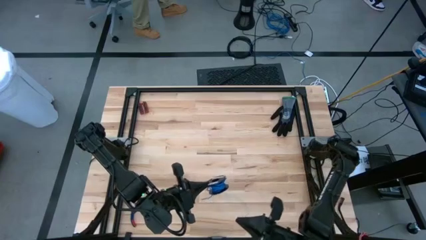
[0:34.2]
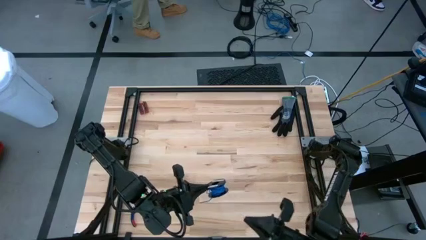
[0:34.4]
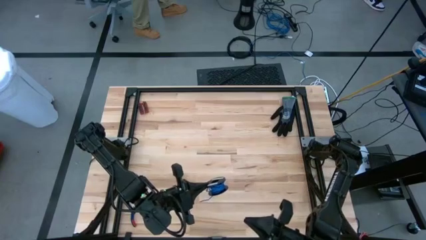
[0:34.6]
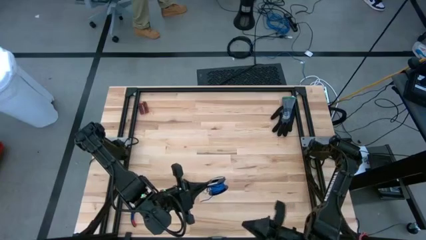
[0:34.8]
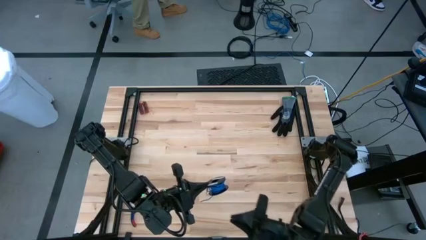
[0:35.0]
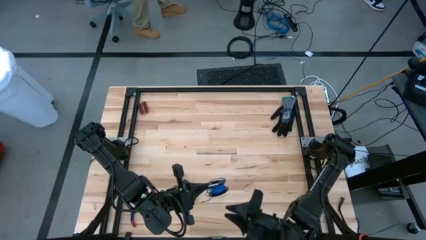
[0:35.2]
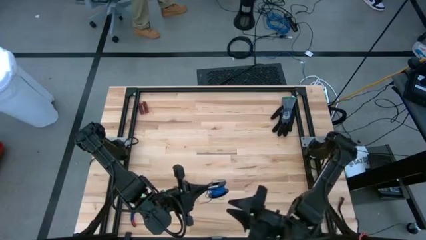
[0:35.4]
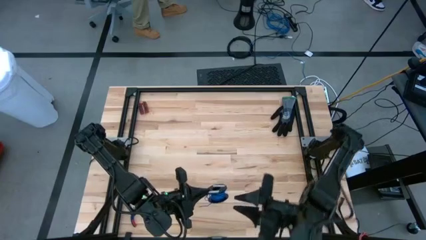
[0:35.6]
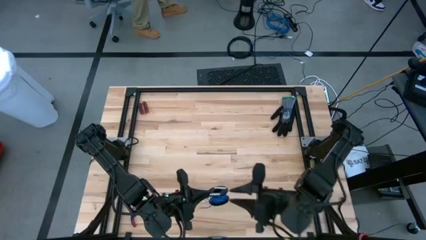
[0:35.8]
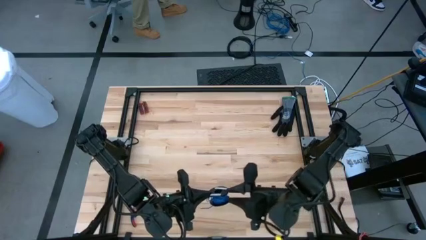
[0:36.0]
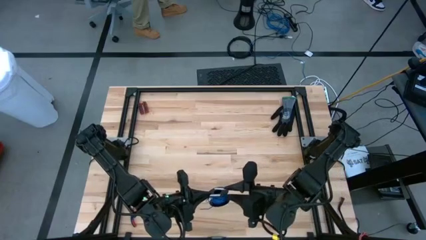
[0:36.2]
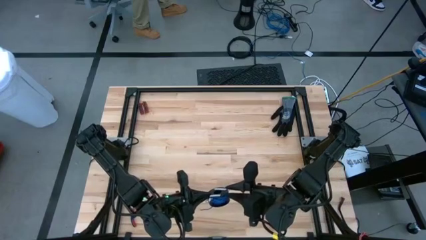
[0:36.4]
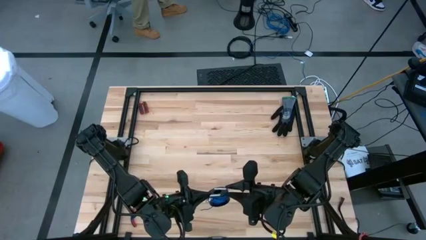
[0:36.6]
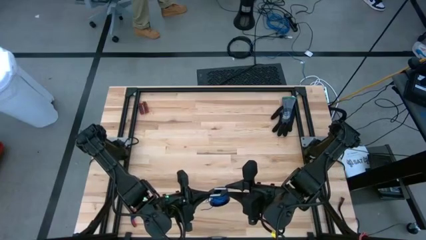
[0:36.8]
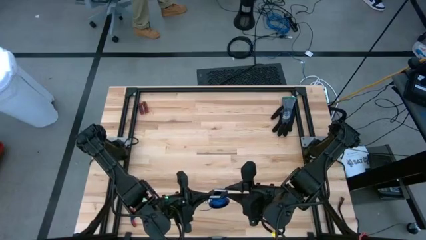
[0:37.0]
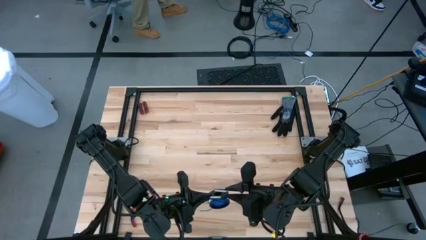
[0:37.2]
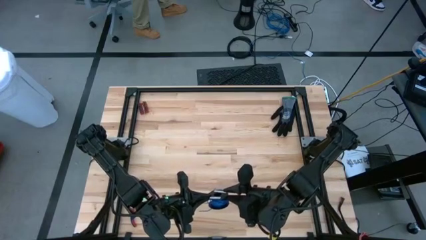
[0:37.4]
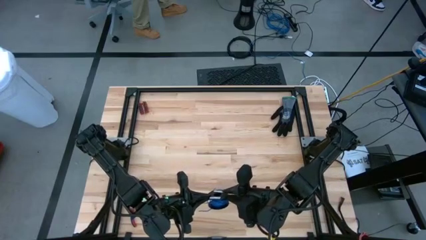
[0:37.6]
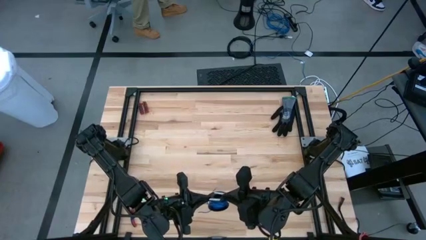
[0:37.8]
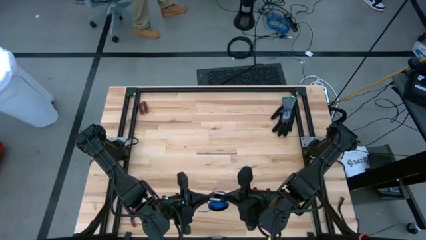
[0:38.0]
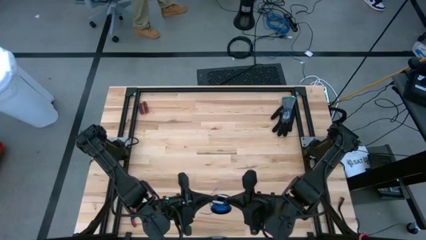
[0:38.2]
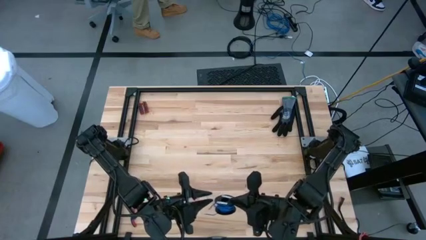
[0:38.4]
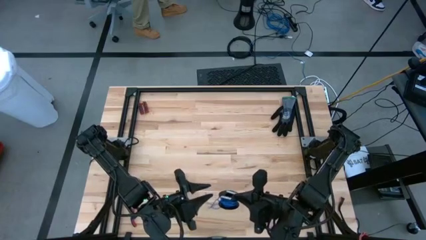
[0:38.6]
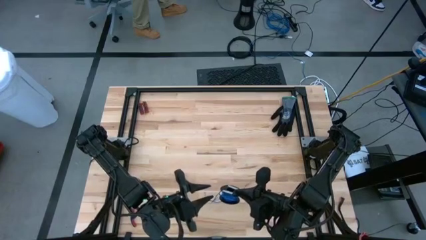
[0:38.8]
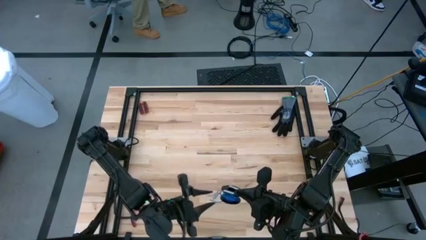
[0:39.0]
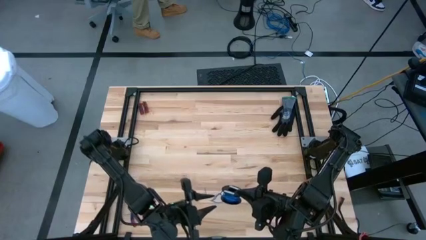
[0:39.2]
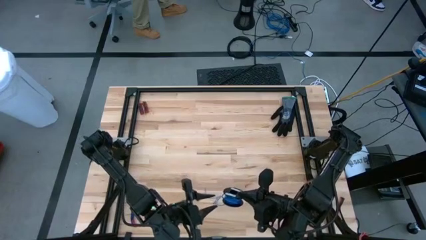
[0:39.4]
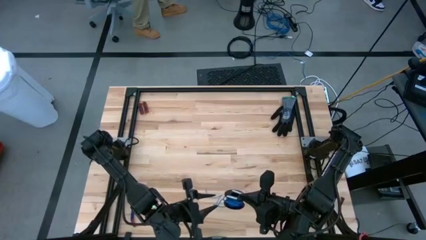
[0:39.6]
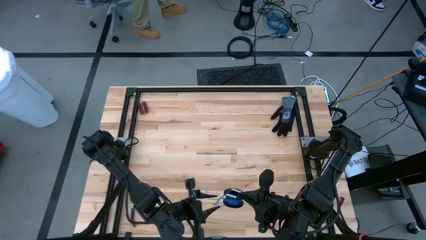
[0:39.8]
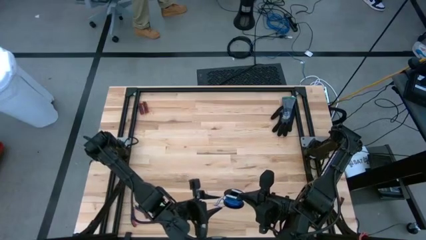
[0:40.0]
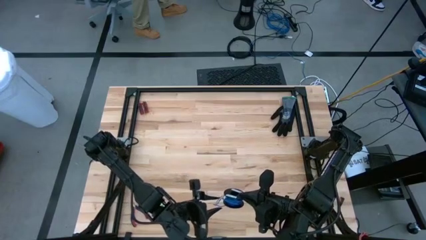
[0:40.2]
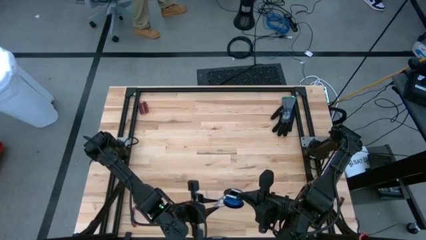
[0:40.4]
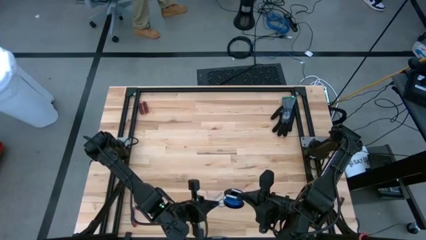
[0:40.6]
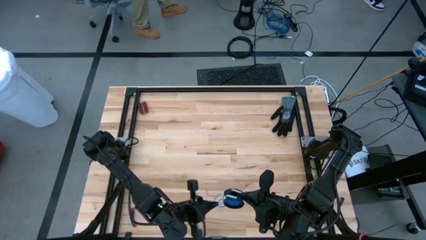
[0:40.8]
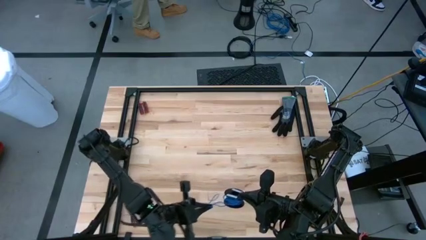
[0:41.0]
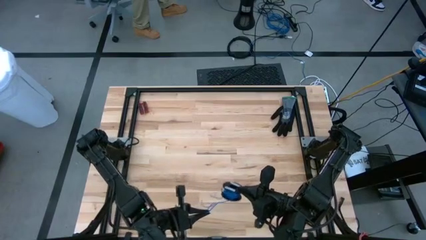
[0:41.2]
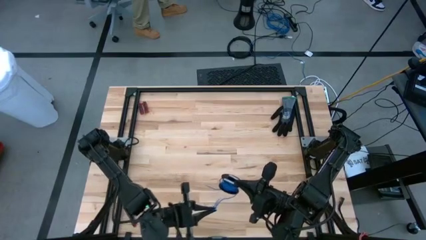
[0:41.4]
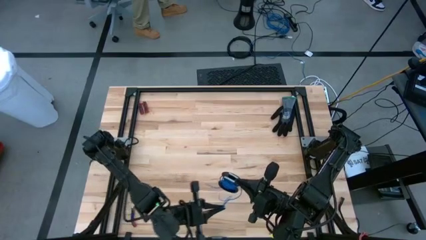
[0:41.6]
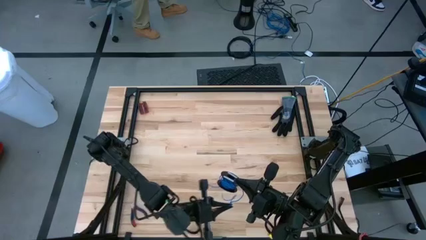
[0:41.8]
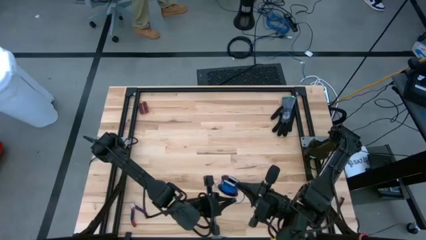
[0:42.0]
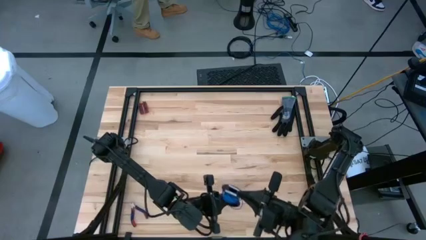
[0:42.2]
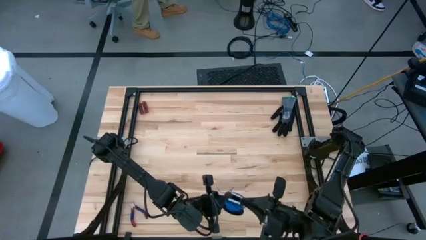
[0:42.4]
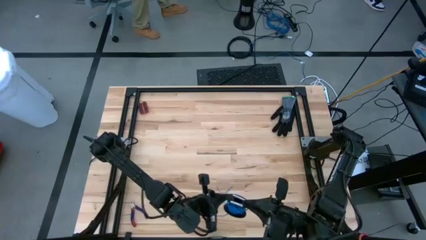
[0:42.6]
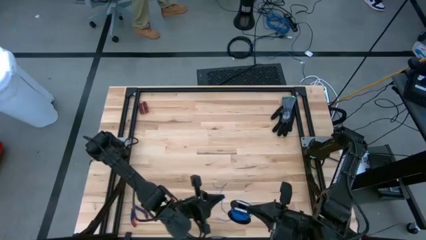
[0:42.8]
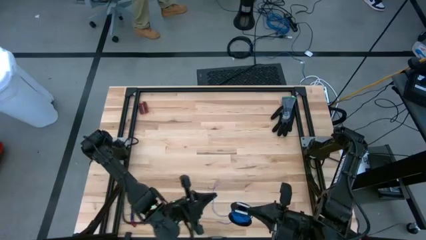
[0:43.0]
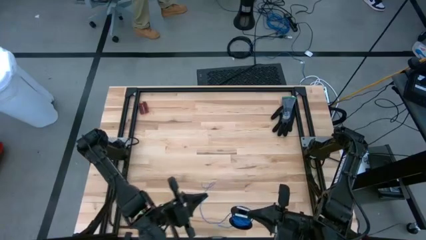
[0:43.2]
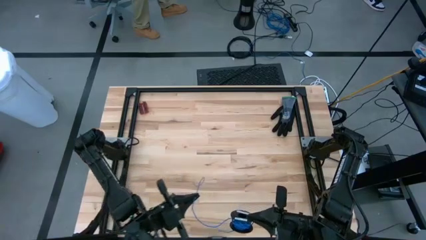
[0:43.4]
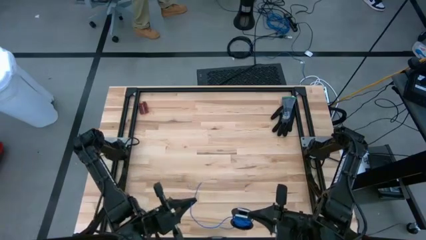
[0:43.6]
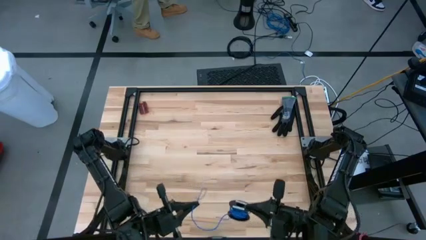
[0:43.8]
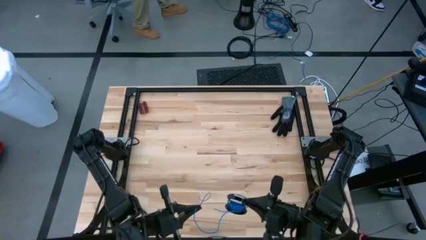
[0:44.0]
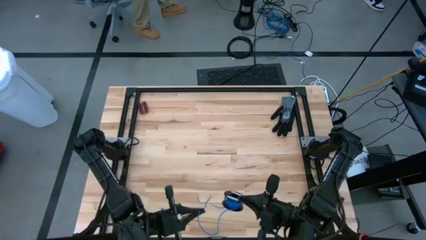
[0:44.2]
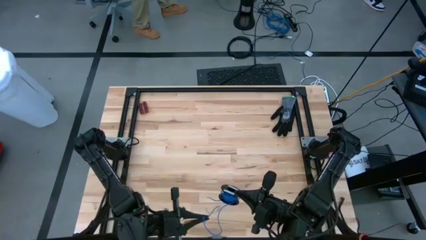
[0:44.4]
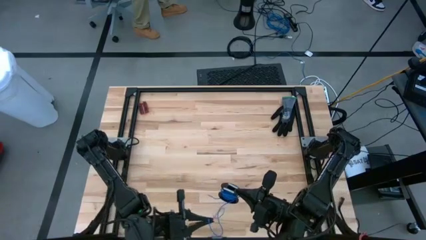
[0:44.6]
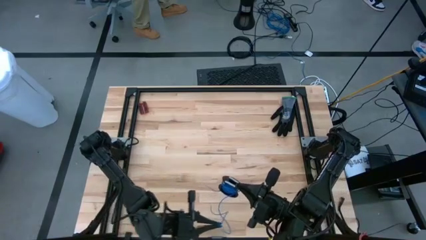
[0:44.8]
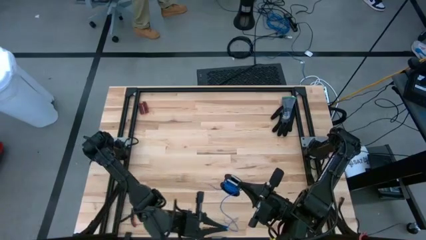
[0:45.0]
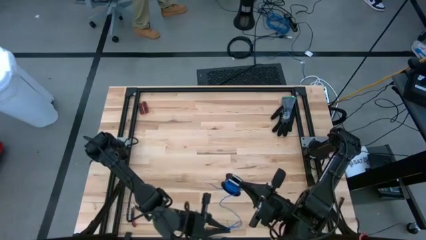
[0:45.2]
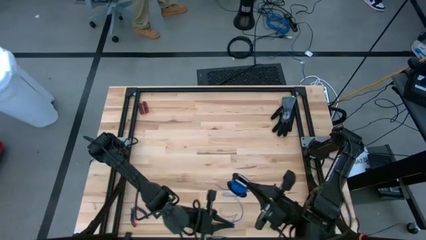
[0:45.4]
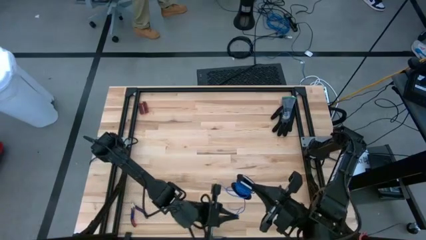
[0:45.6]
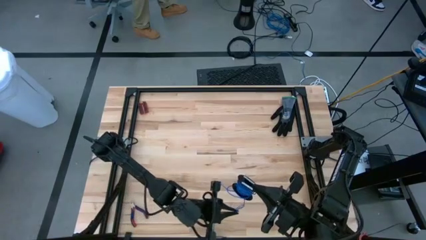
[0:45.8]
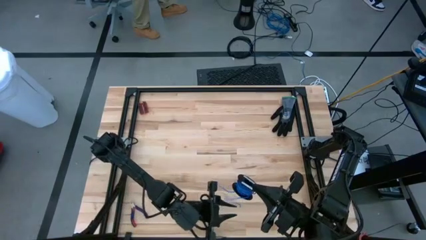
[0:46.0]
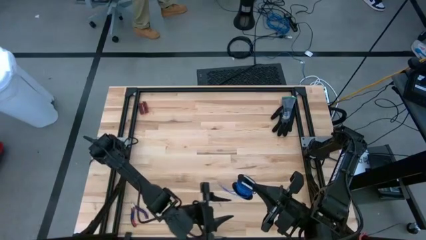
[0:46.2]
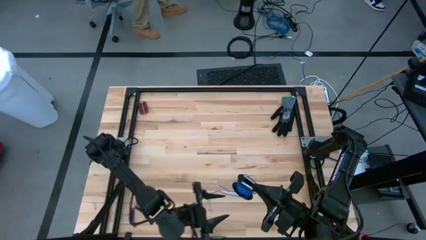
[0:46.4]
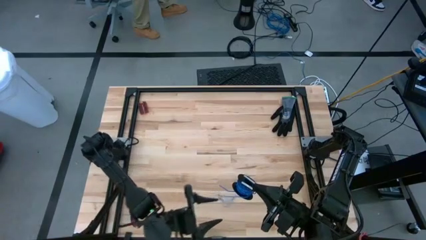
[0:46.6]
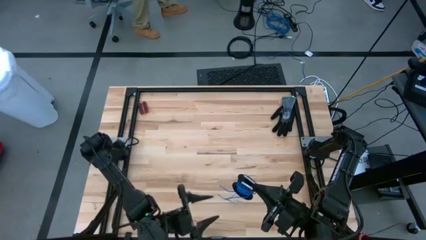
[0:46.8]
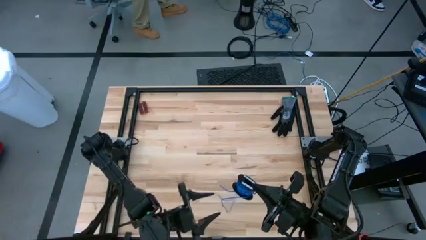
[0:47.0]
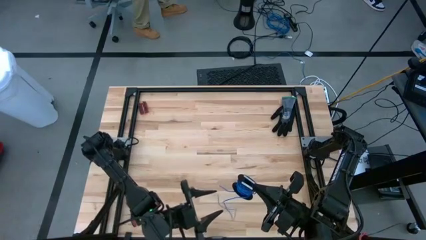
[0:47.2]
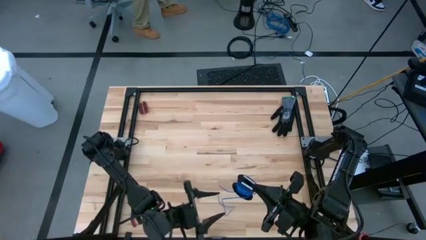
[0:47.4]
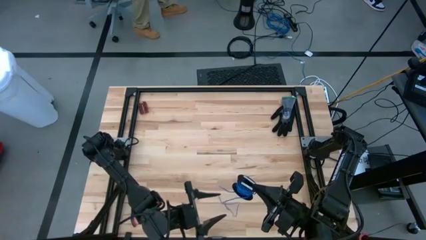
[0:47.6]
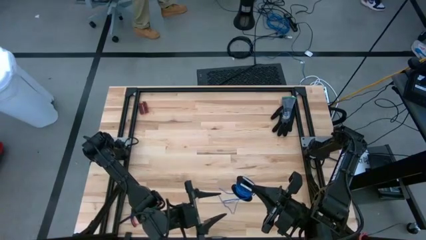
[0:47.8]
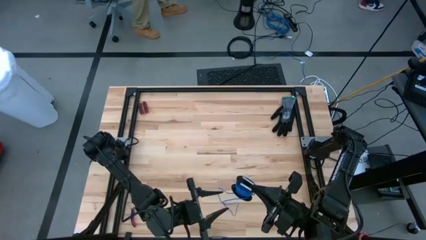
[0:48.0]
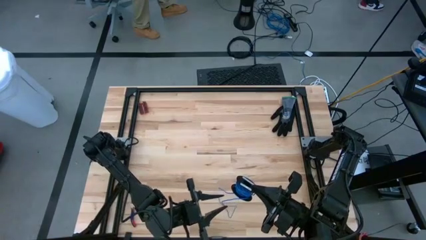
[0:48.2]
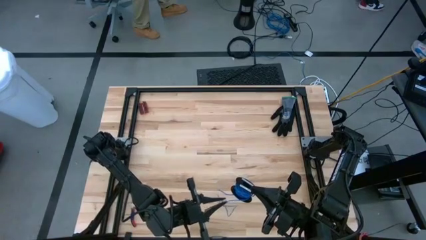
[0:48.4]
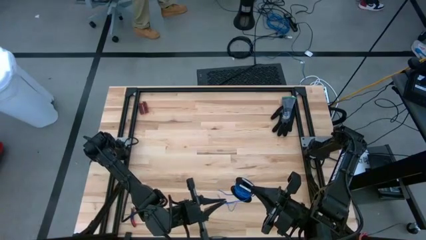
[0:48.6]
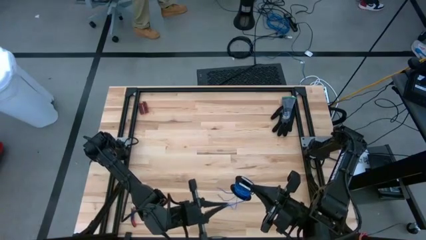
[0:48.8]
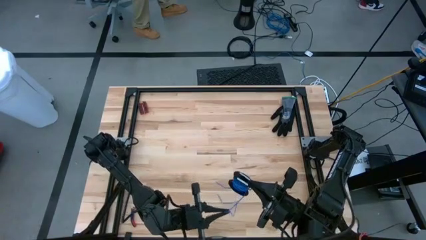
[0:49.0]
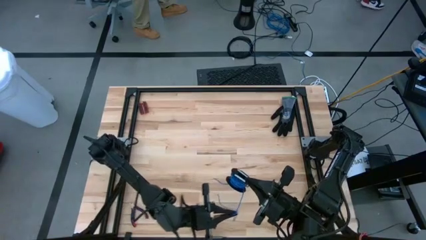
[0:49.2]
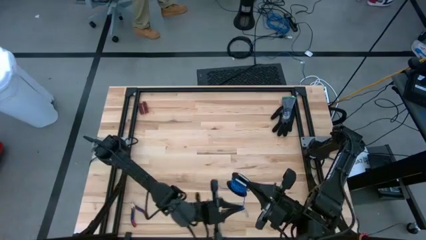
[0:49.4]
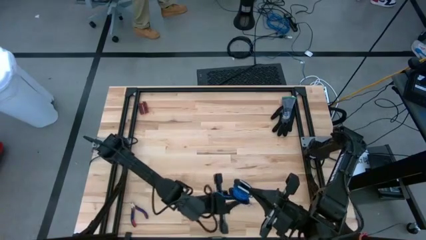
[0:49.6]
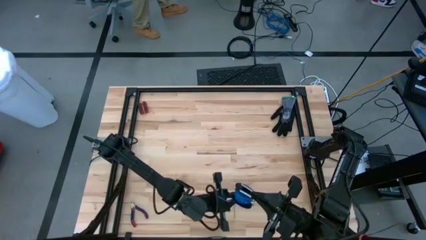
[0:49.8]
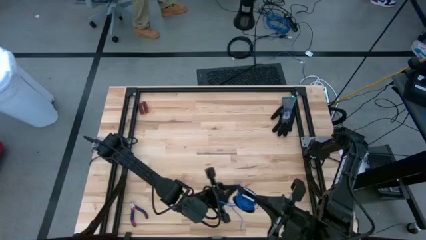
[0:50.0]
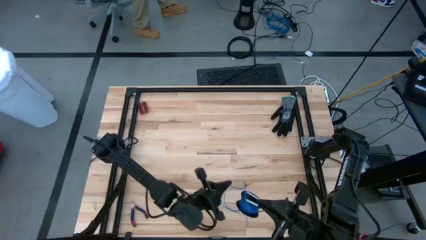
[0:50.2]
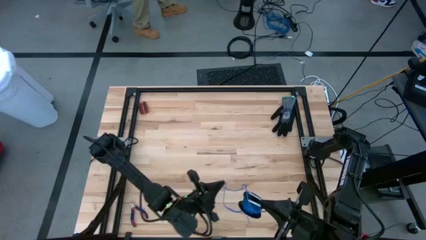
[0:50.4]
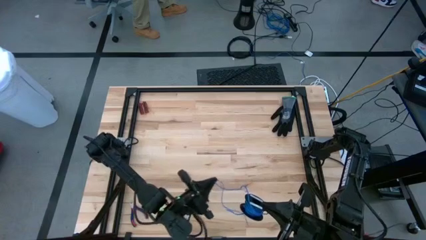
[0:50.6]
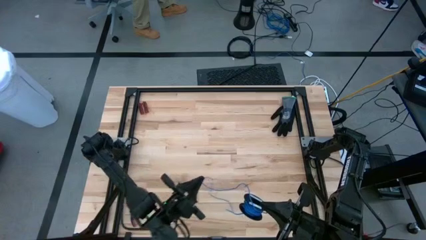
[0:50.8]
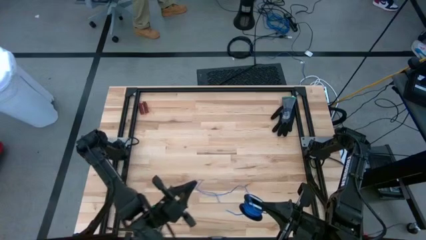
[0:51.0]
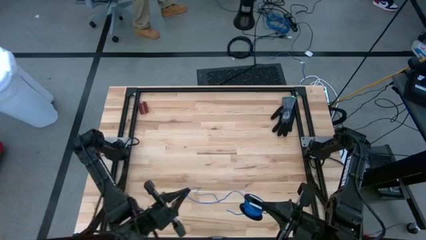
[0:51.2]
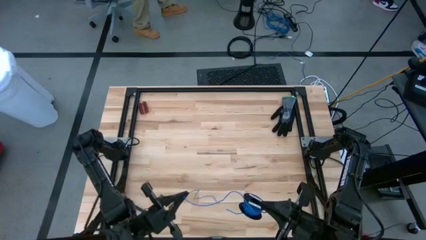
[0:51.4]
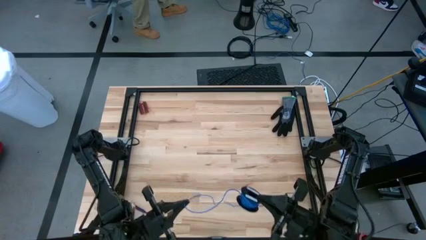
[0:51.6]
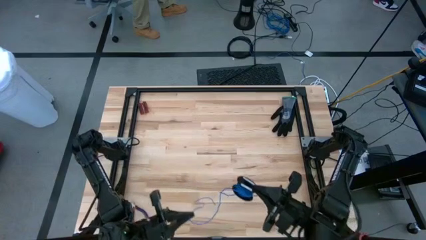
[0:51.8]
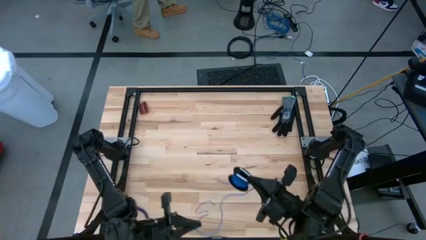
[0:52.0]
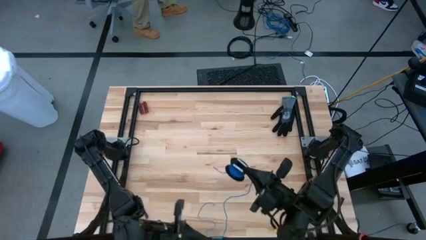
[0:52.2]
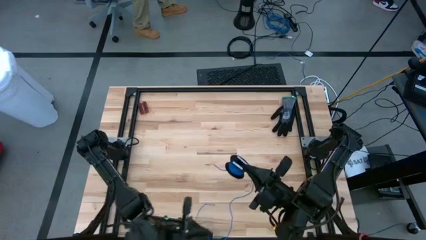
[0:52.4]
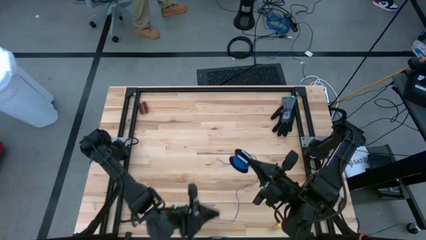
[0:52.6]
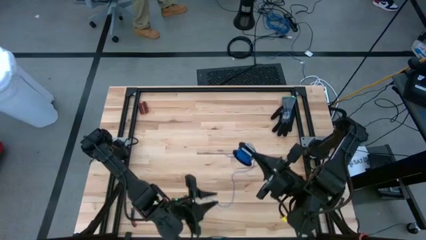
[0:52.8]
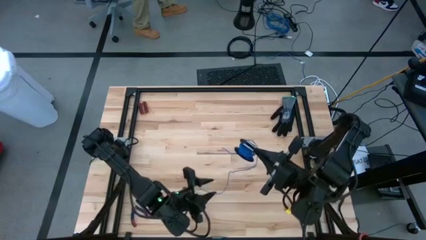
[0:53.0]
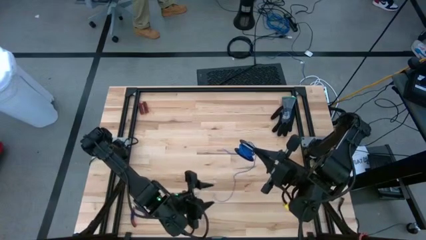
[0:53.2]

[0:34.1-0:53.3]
Task: Coil cords
Uncoil the blue wire from the spool
